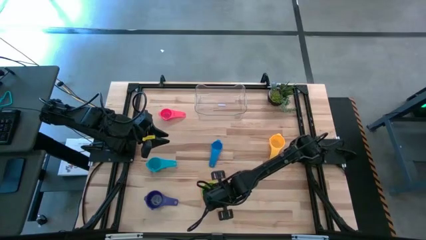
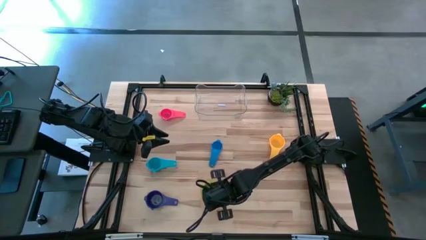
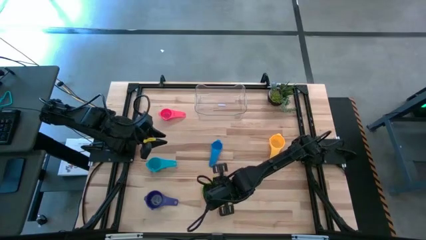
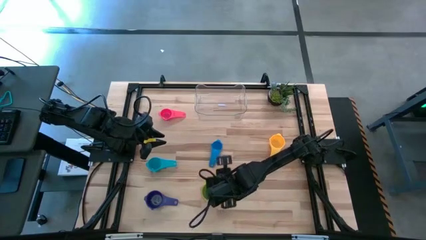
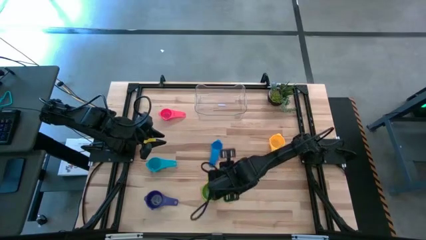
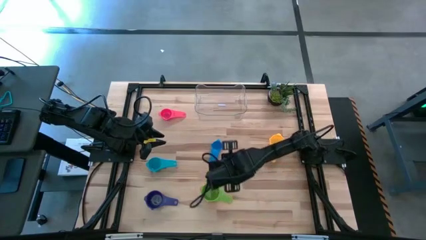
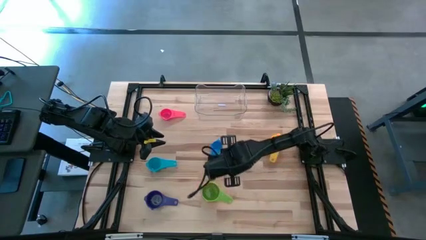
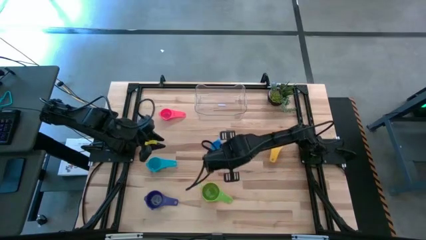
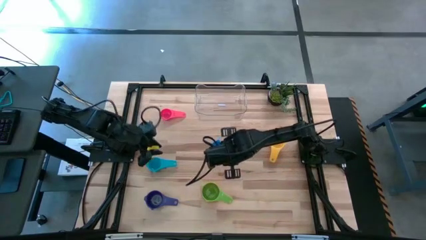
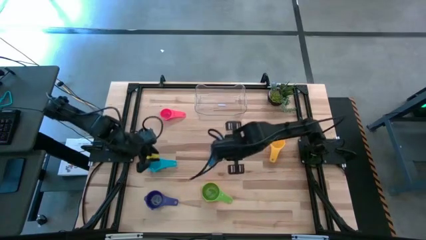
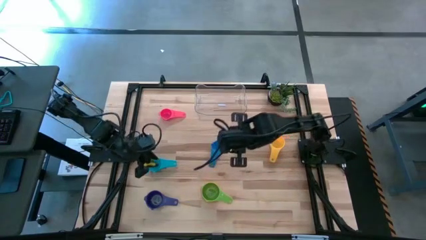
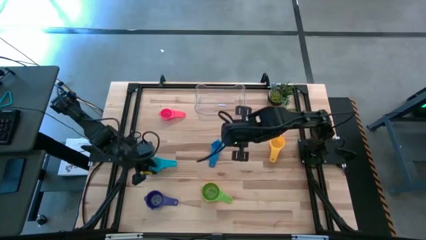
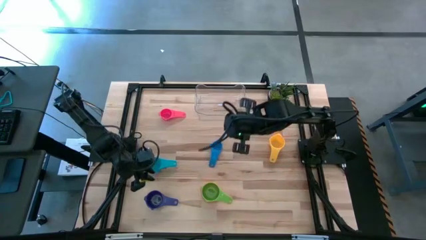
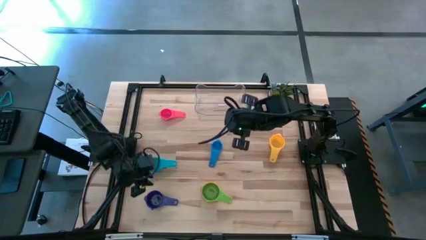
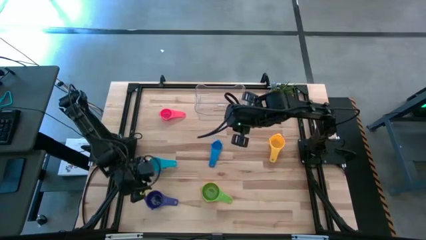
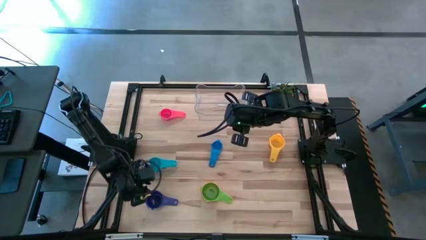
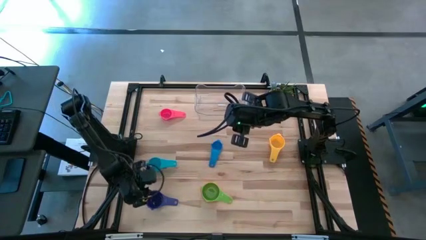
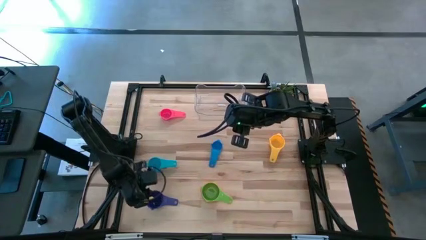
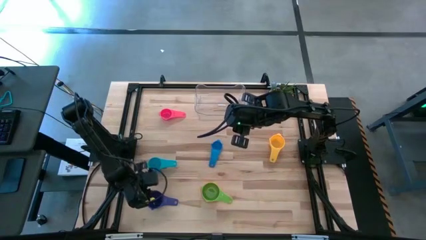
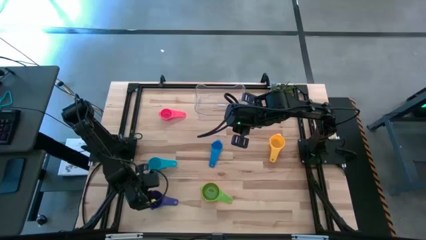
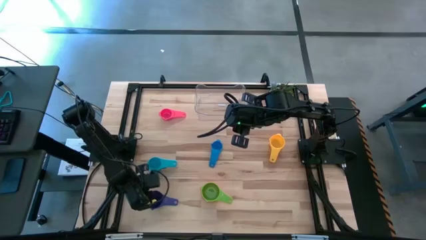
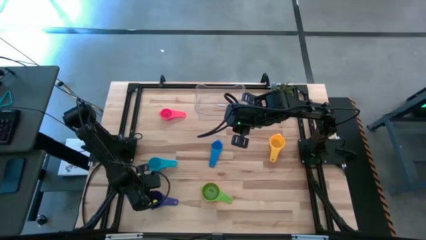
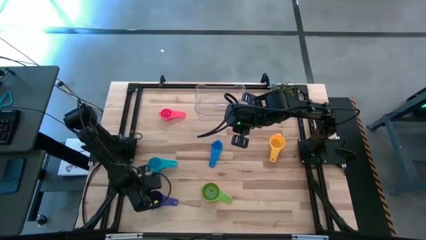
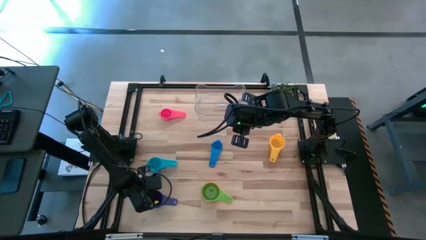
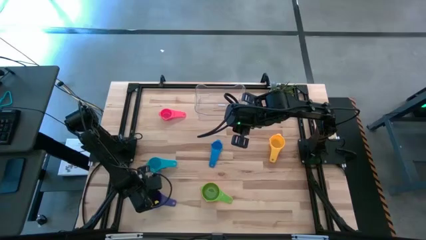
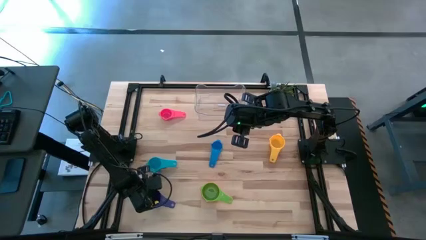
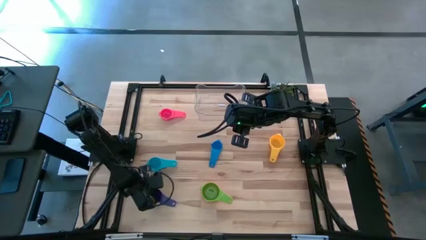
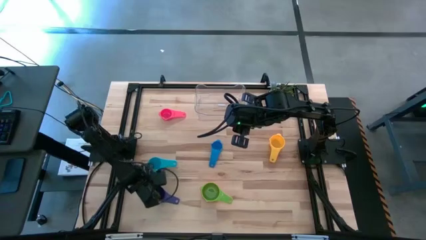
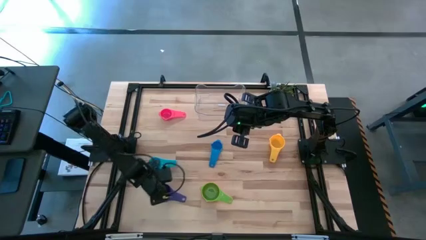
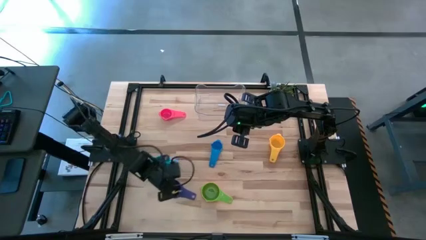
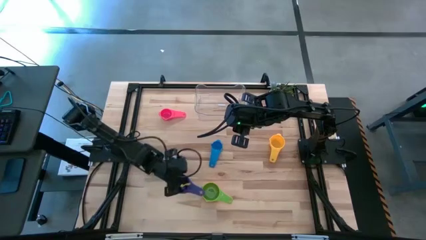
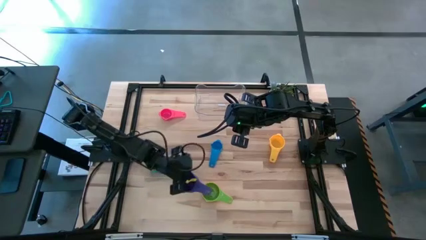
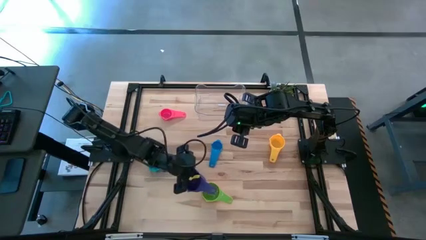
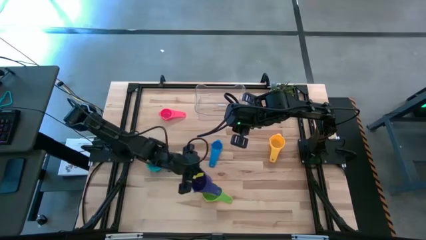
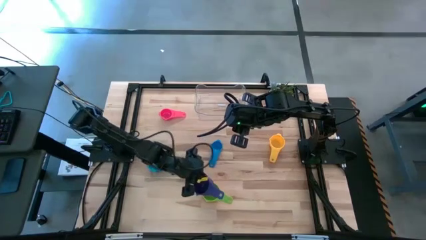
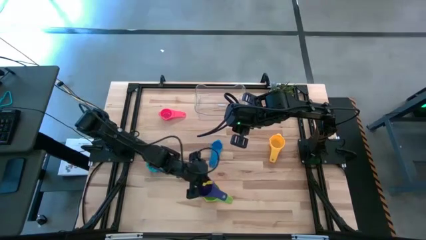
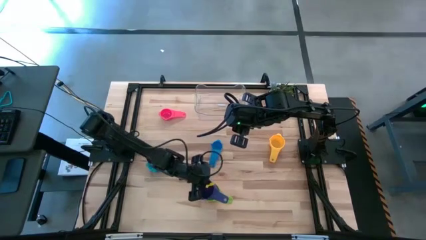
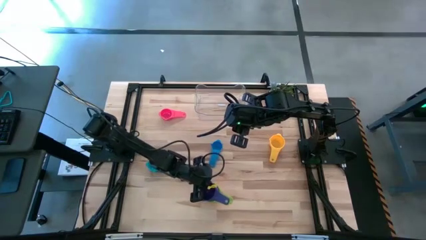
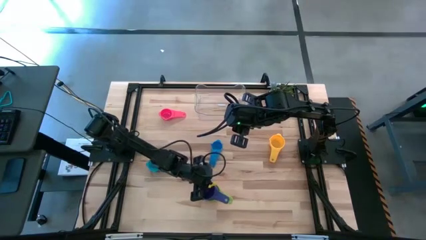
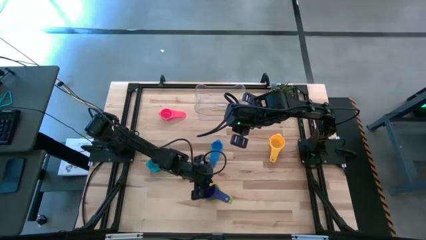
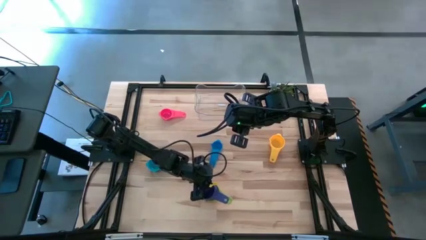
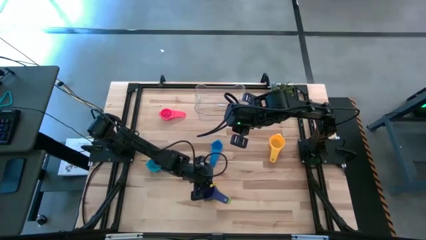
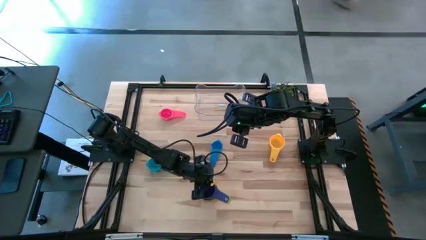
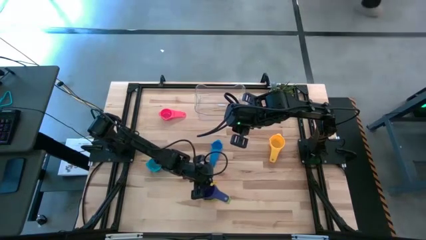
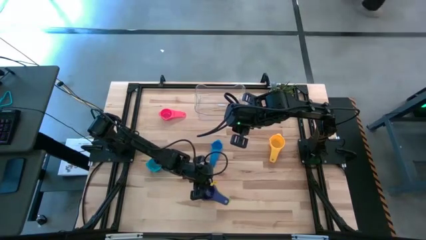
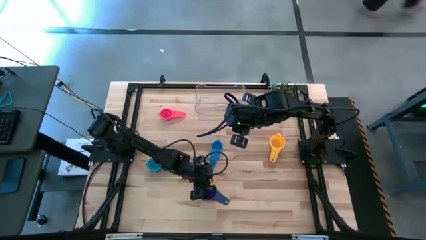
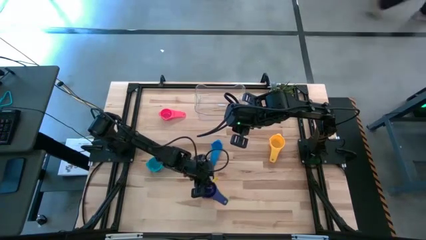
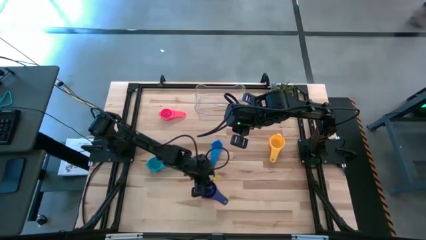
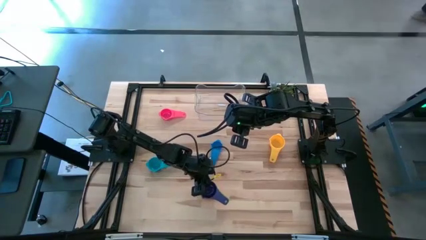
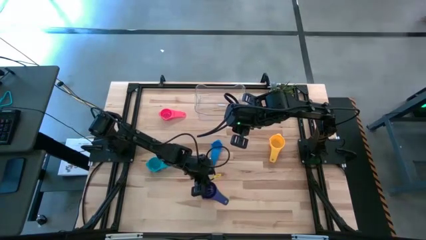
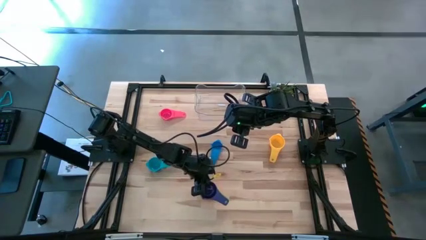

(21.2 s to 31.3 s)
Task: Nest measuring cups in basket
Stack the dark blue measuring cup in the green measuring cup

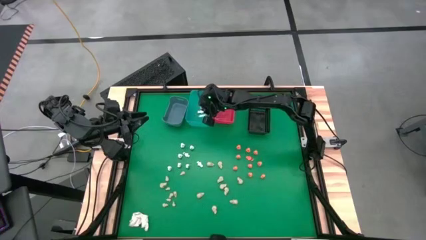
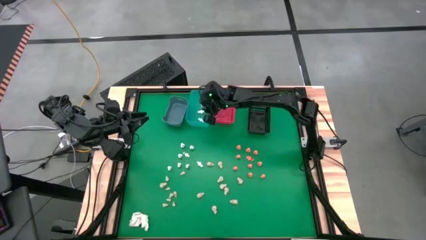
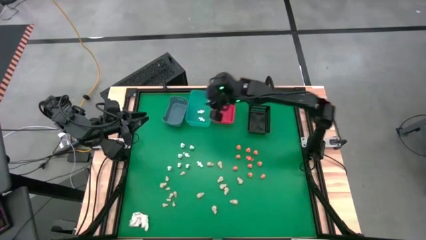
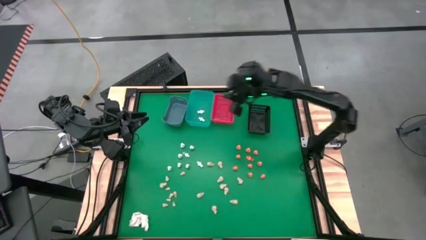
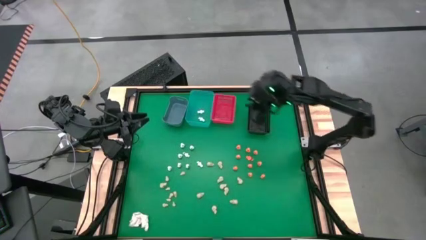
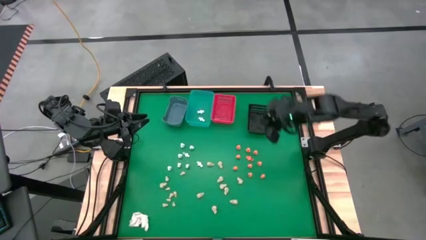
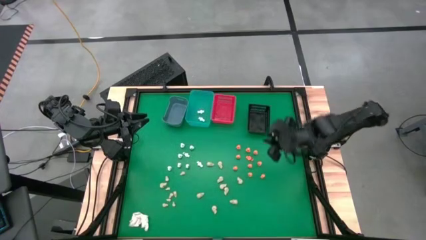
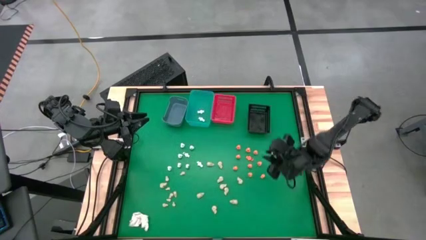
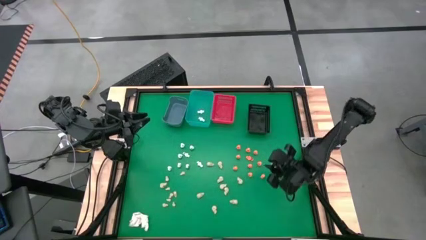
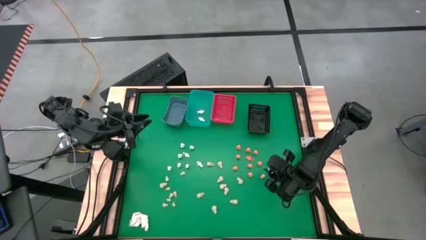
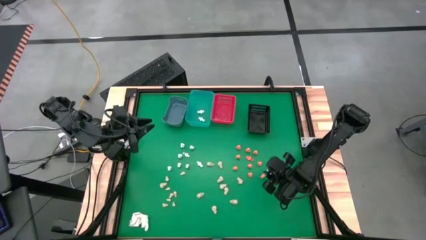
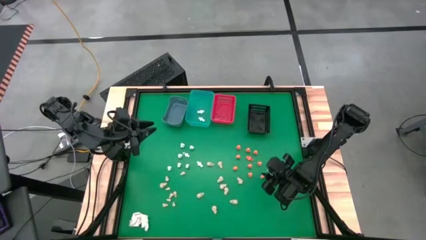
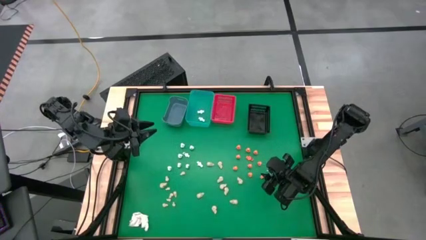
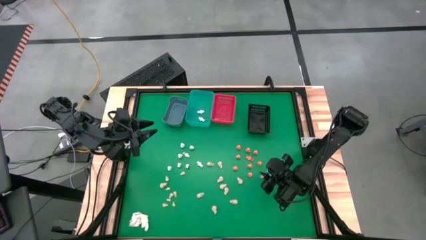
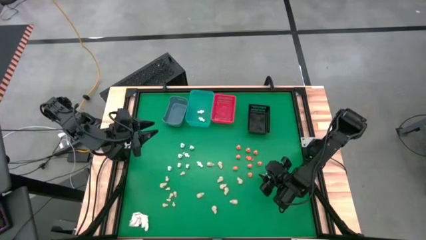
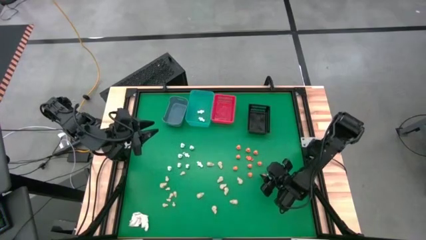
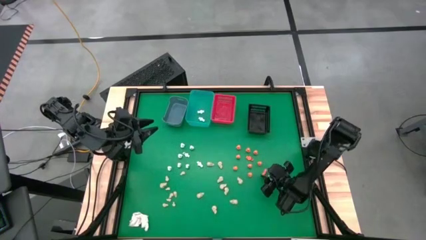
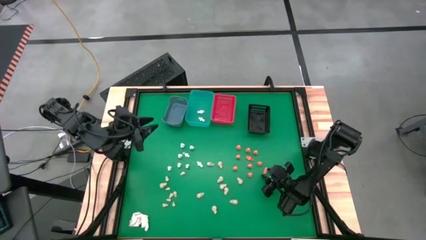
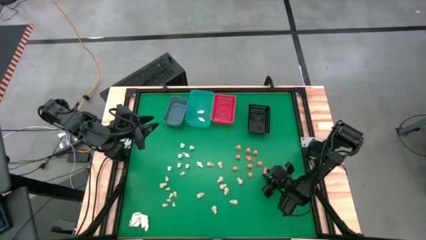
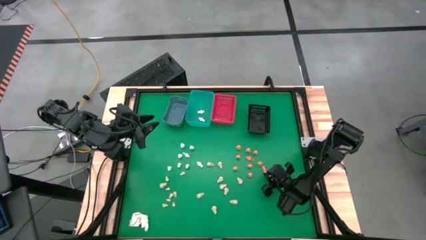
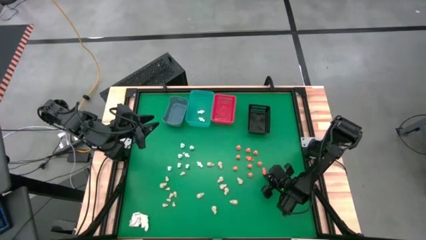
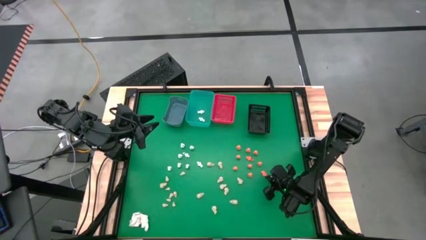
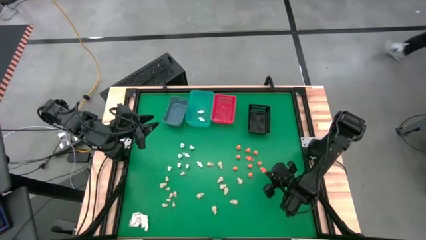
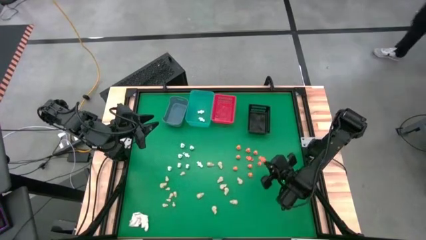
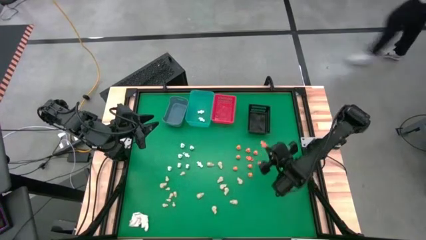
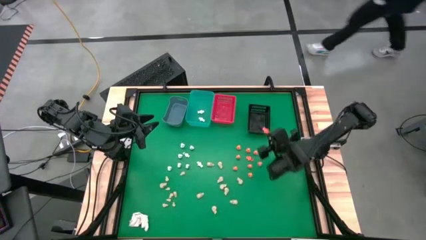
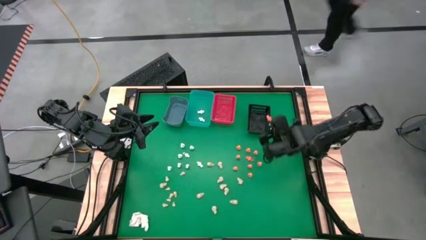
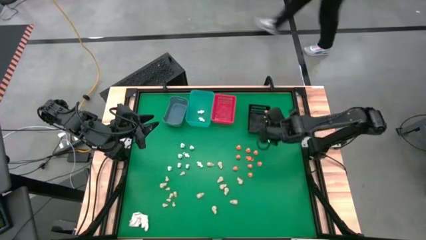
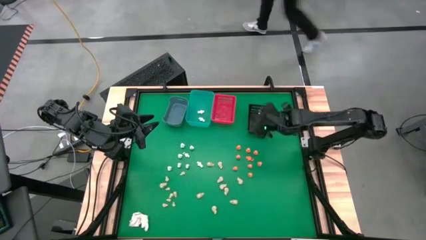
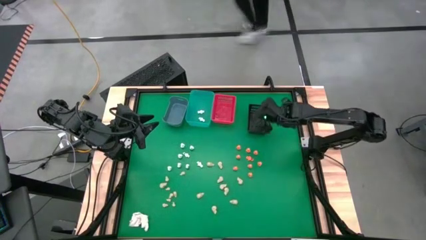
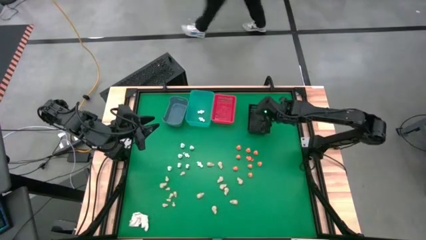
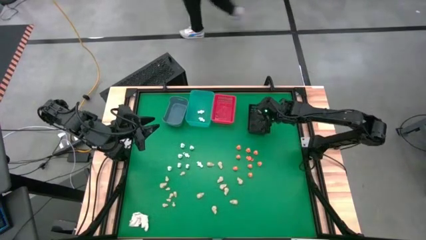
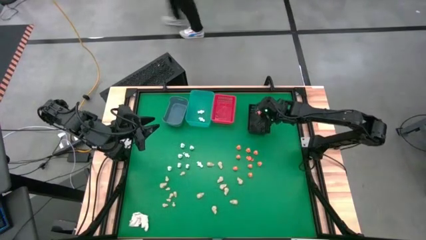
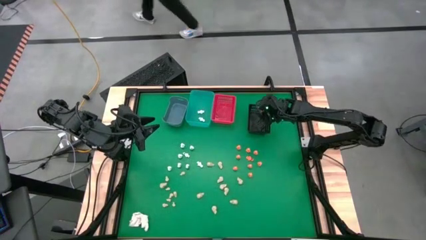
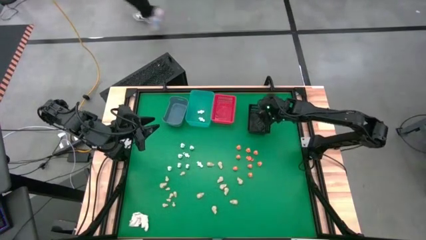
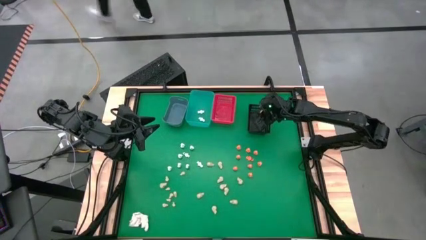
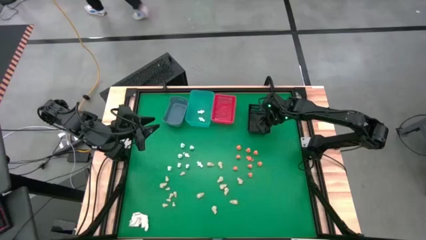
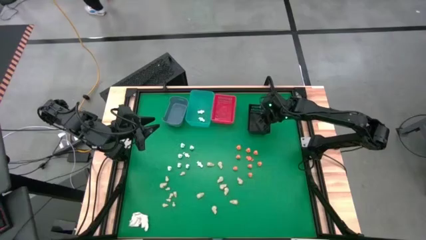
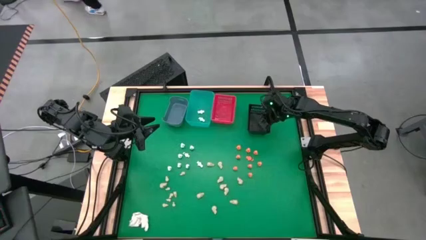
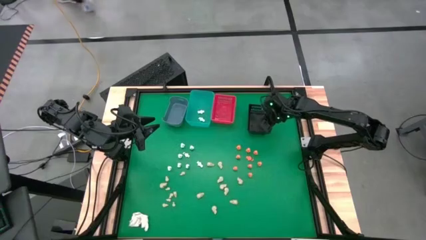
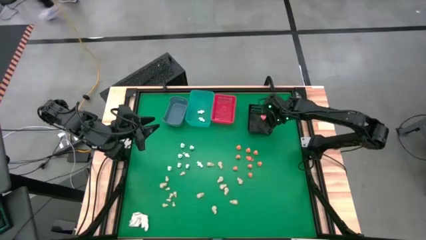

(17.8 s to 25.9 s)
Task: Sort Halloween decoration
Put the orange skeleton toy into the black bin
